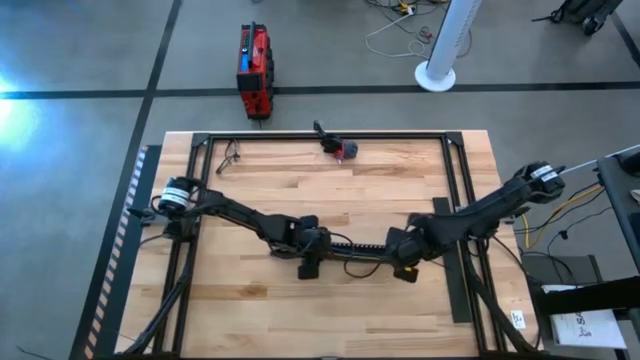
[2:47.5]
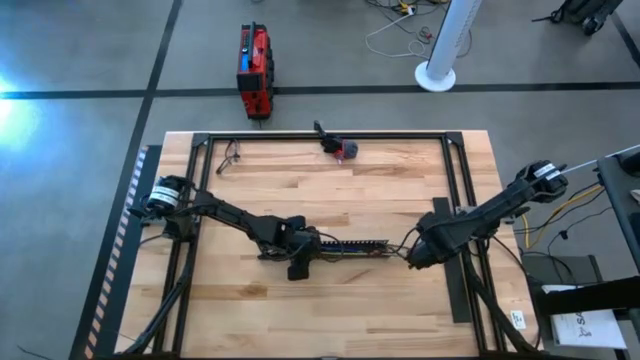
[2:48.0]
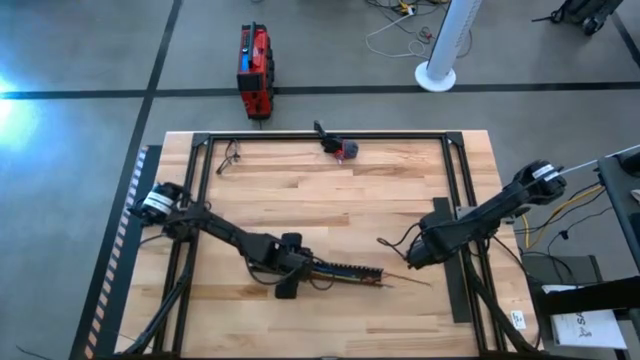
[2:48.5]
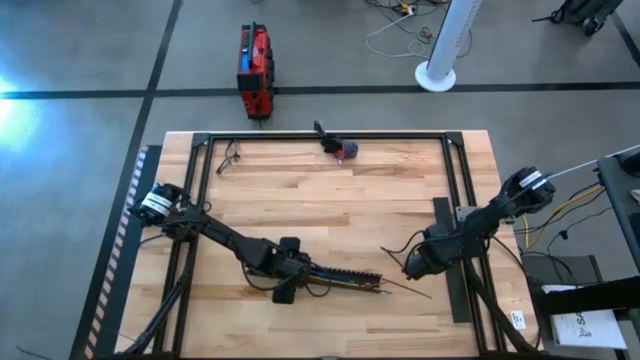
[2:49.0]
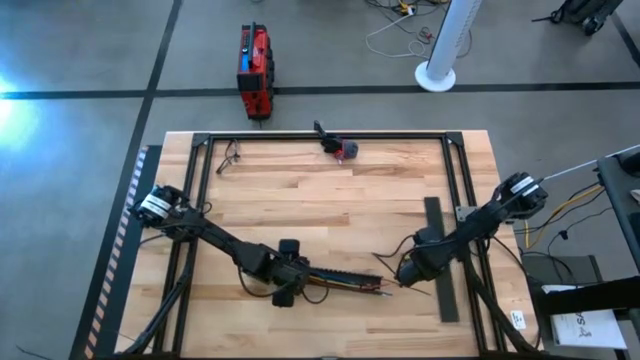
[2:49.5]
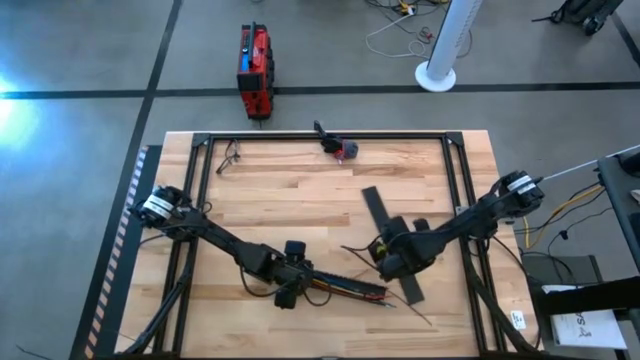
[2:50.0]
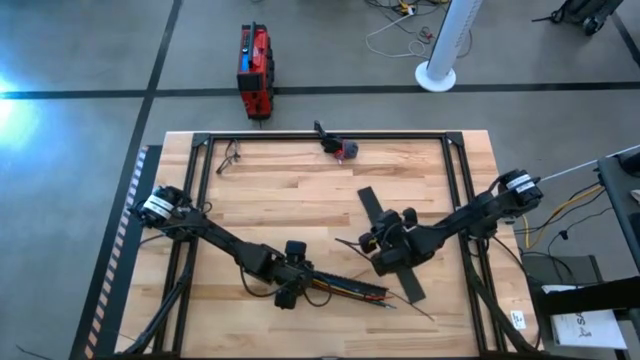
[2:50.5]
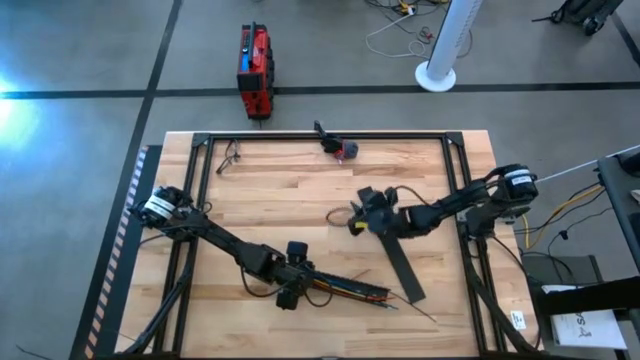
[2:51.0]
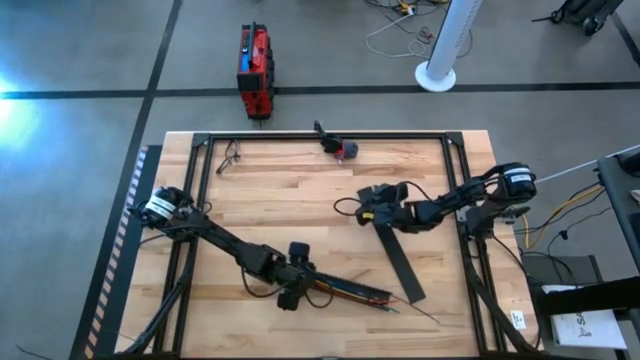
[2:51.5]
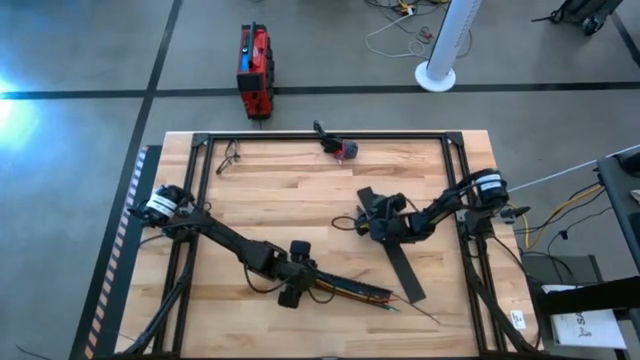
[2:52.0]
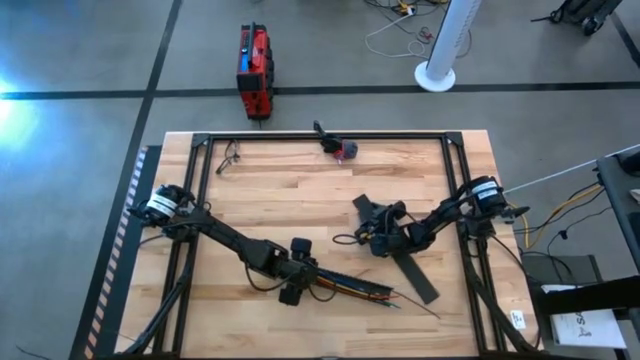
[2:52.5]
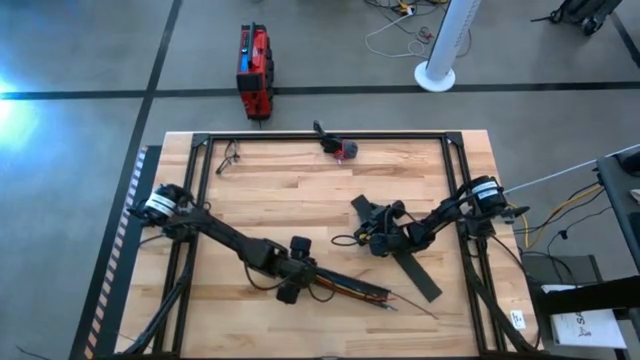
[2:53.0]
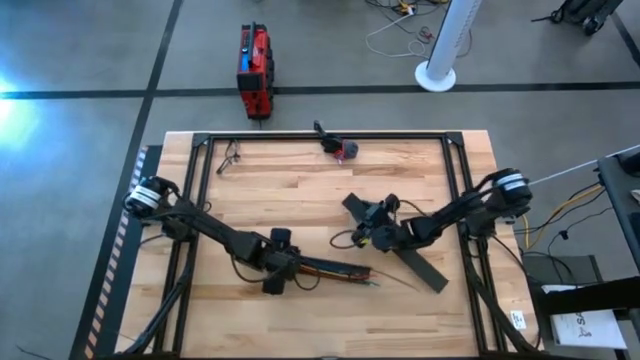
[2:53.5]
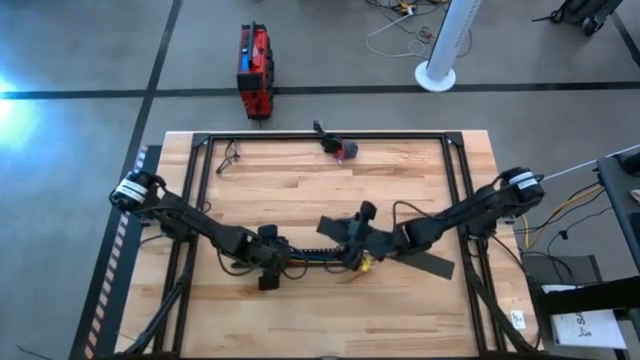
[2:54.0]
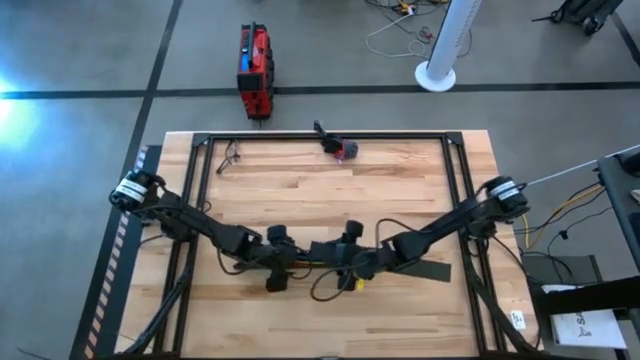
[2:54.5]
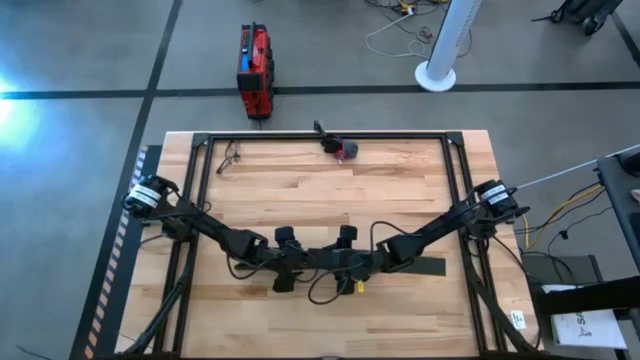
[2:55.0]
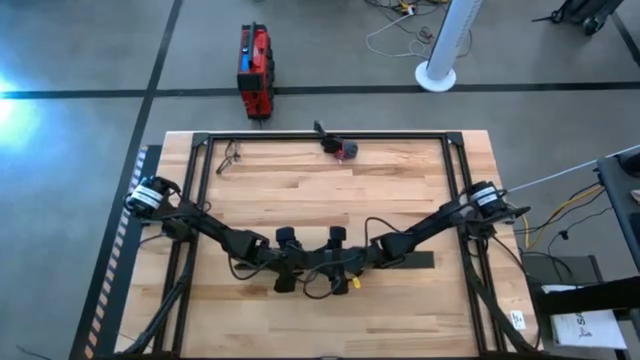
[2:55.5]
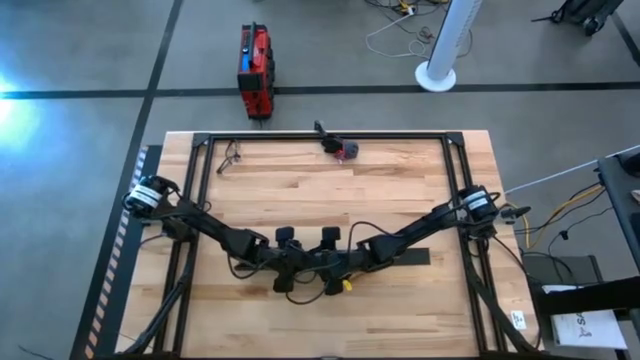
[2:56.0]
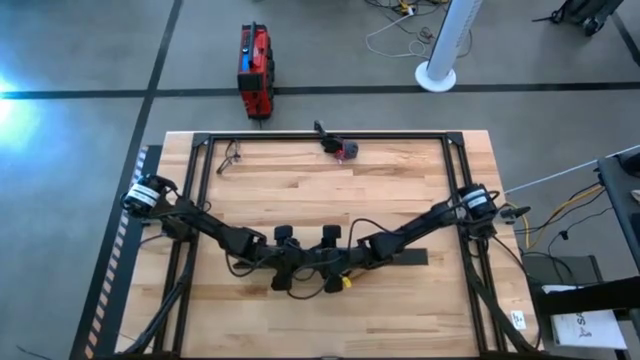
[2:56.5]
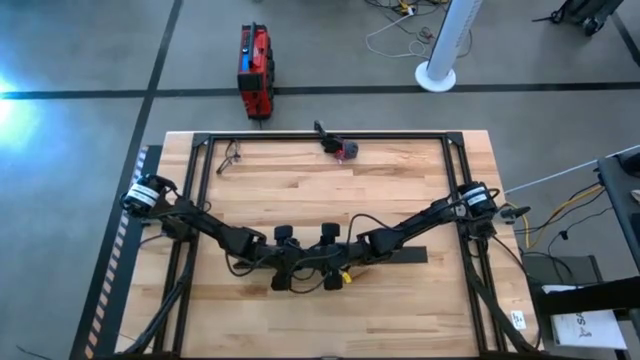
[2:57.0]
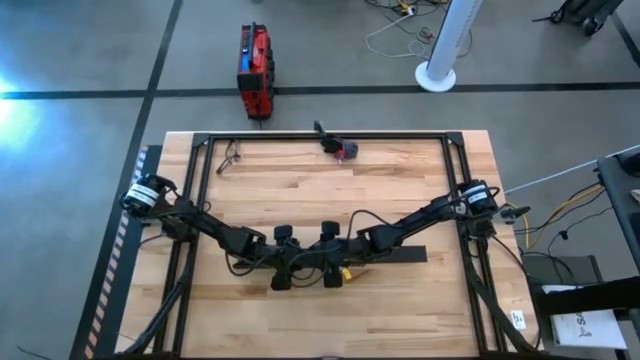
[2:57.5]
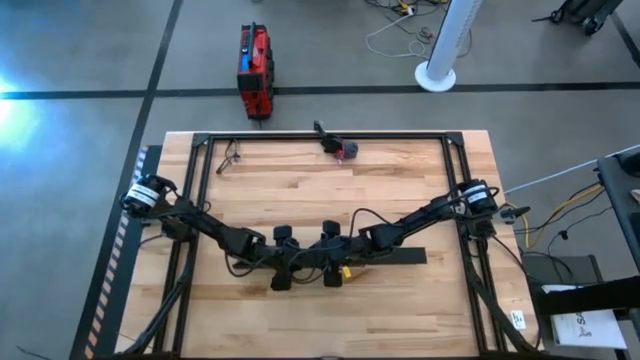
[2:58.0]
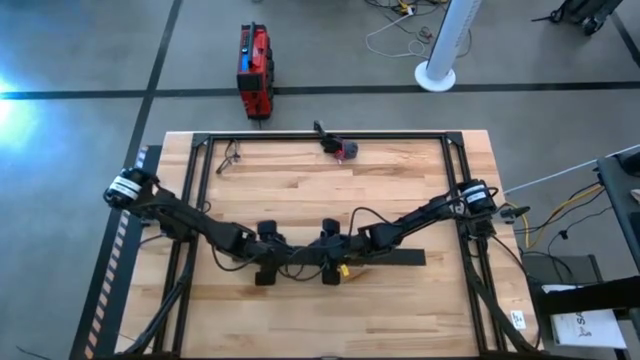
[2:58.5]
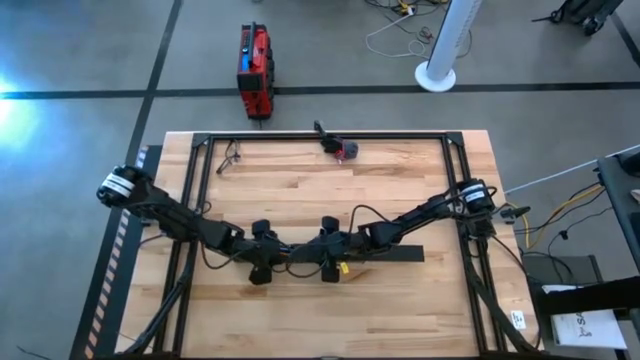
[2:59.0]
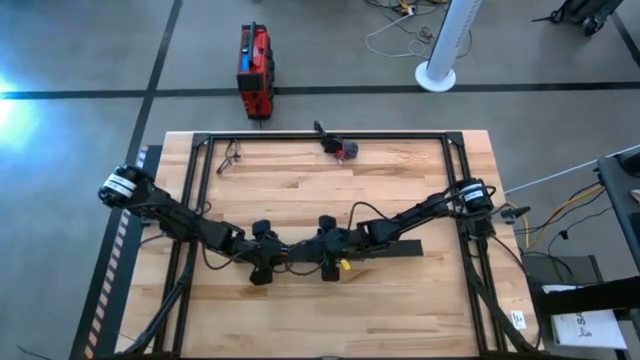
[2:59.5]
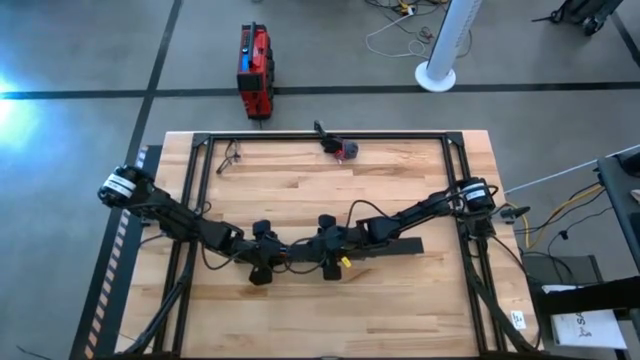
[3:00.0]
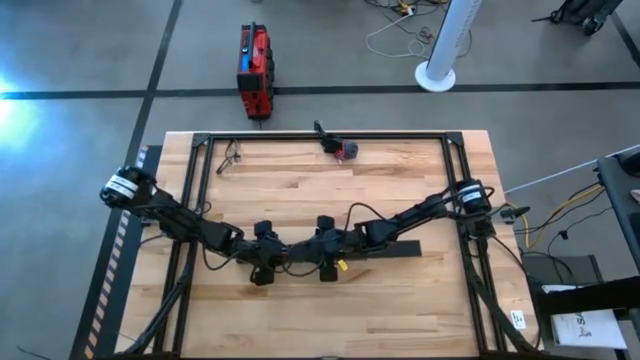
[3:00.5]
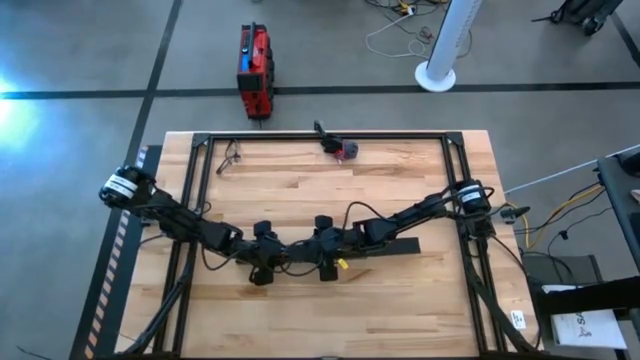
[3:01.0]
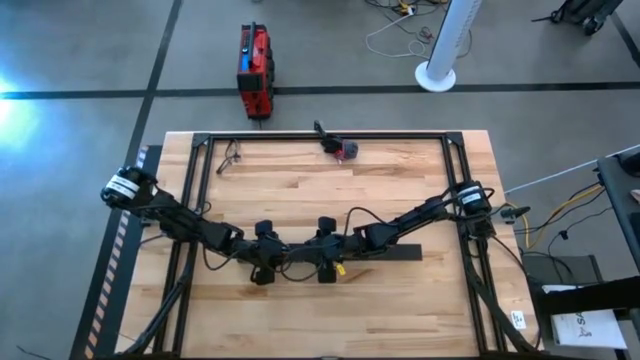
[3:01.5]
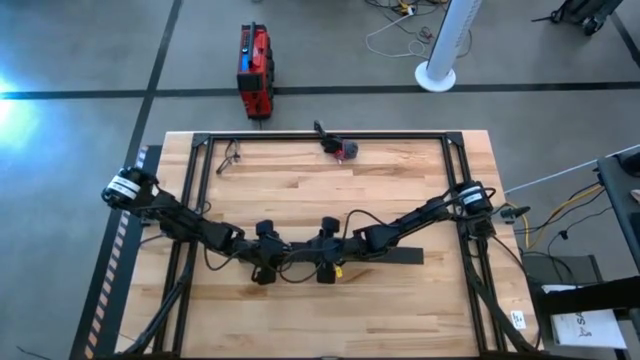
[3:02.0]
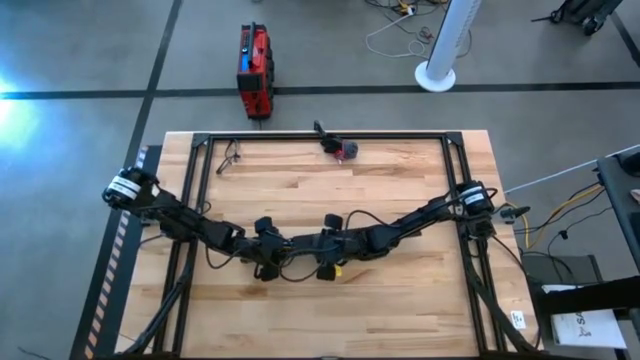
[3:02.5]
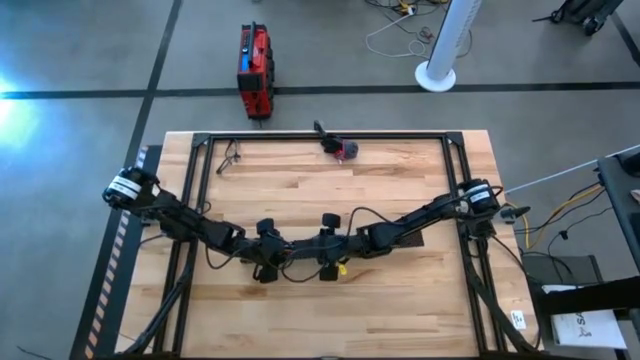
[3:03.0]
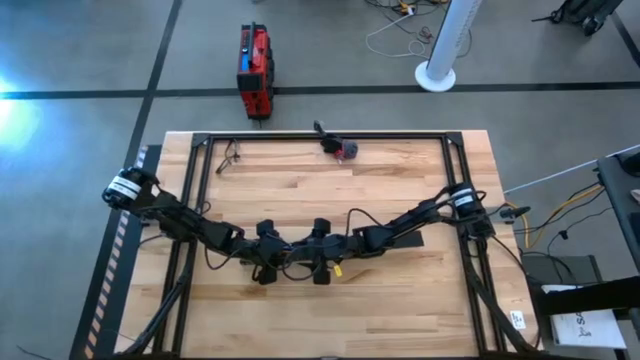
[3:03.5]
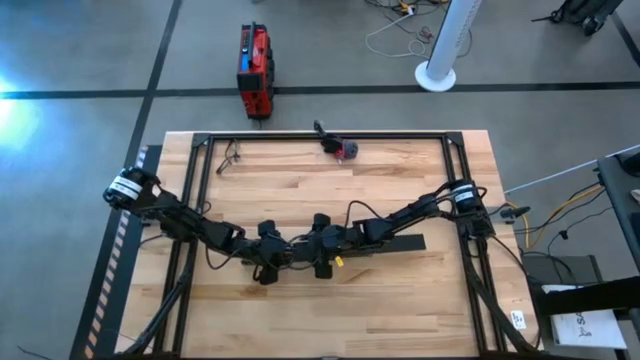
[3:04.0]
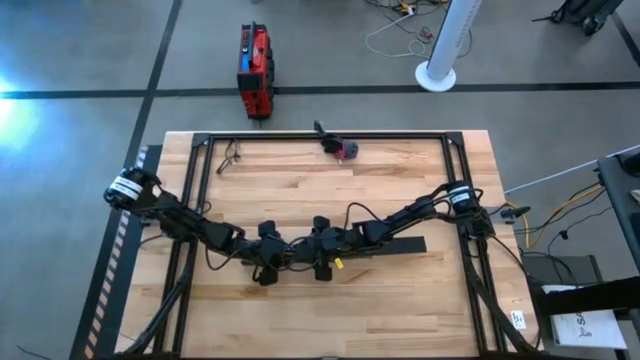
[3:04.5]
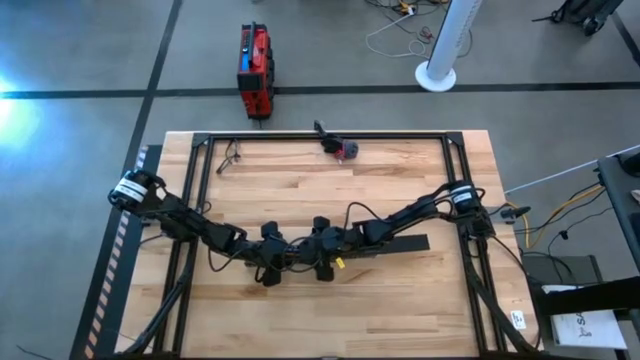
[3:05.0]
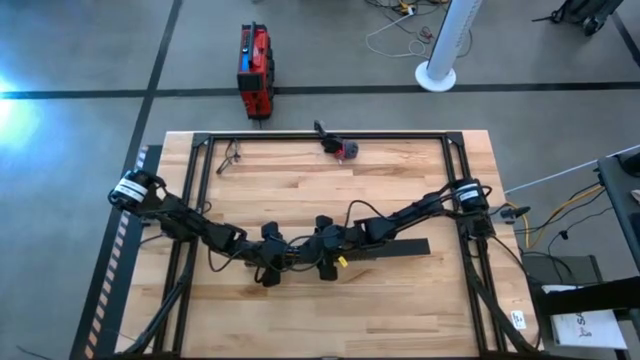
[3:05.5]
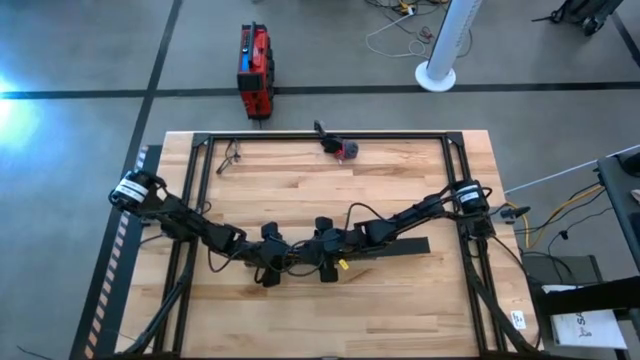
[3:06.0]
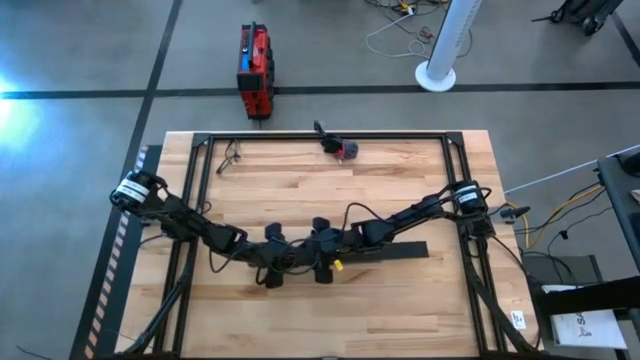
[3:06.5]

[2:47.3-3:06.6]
Task: Ziptie cables
Close the black cable duct
